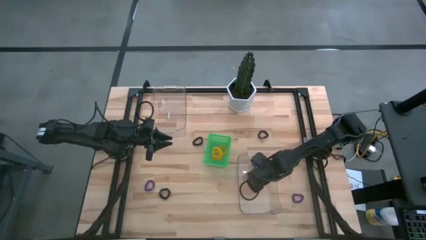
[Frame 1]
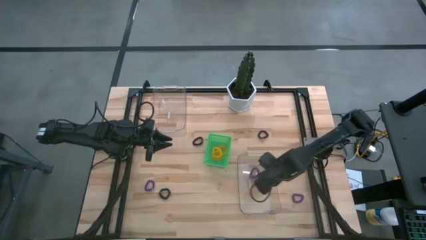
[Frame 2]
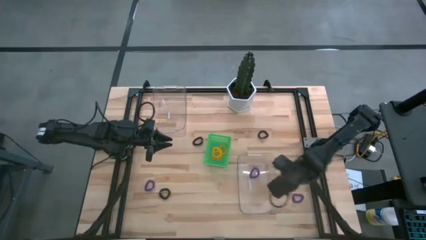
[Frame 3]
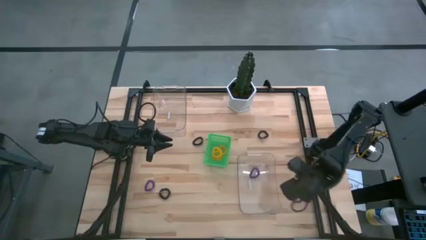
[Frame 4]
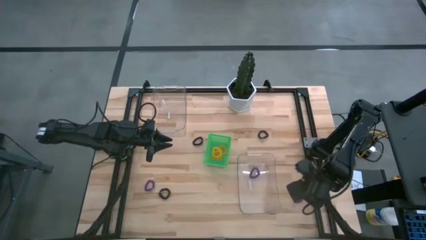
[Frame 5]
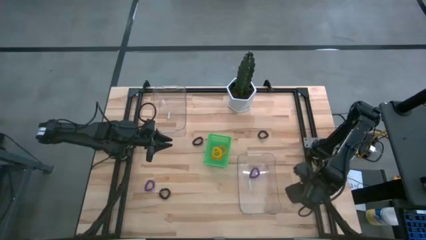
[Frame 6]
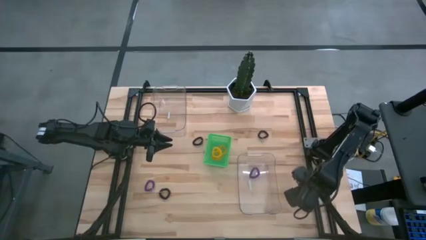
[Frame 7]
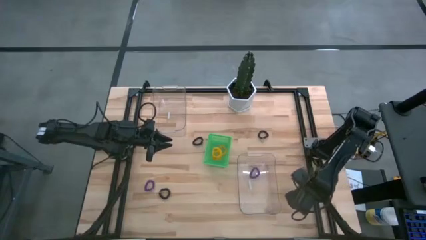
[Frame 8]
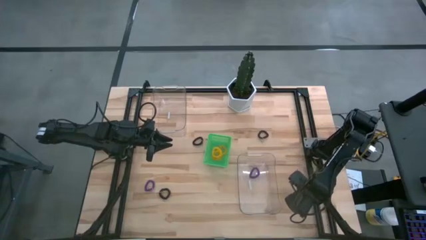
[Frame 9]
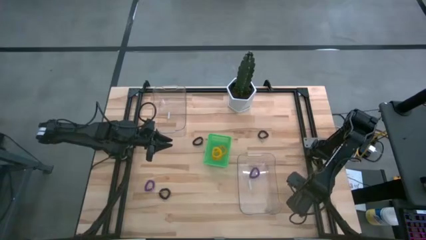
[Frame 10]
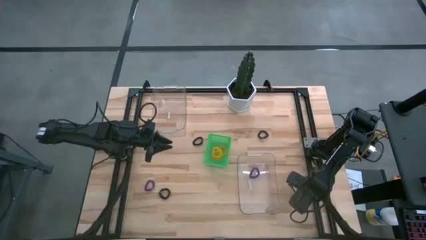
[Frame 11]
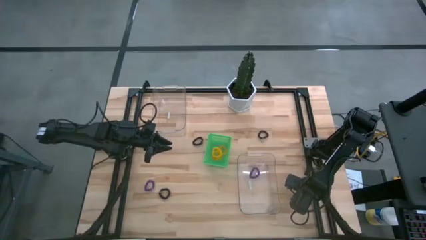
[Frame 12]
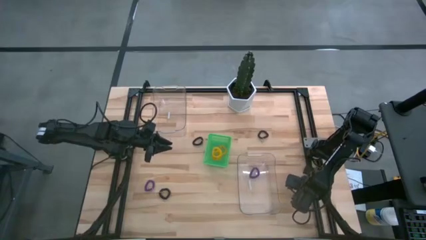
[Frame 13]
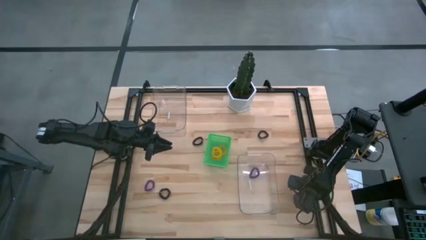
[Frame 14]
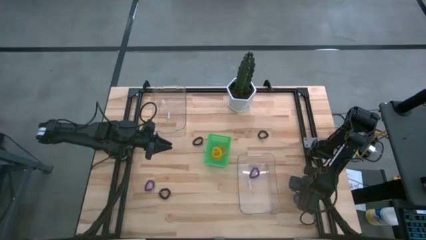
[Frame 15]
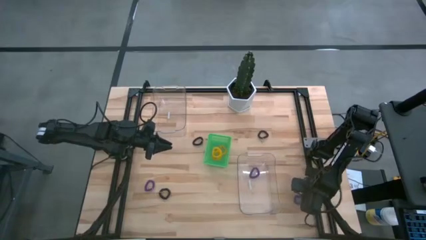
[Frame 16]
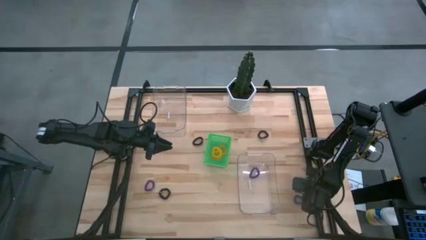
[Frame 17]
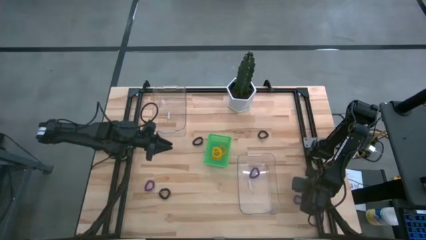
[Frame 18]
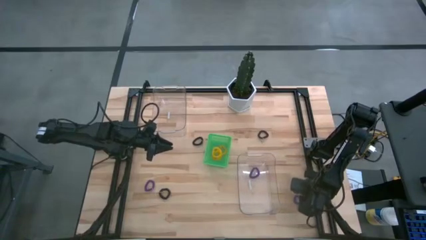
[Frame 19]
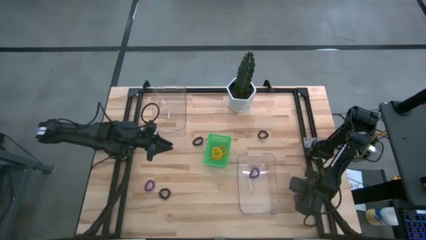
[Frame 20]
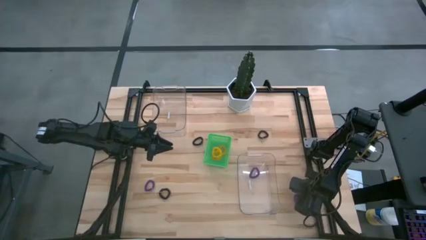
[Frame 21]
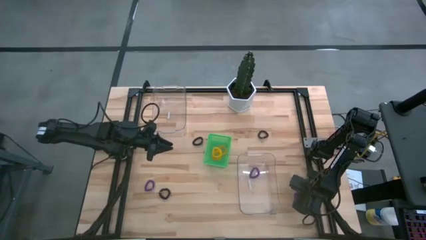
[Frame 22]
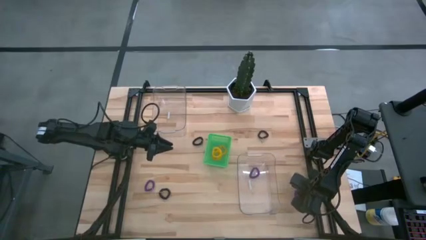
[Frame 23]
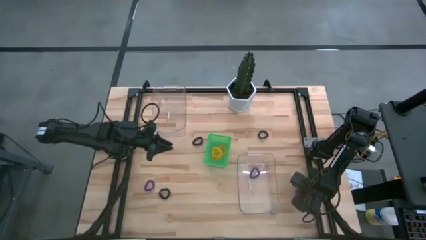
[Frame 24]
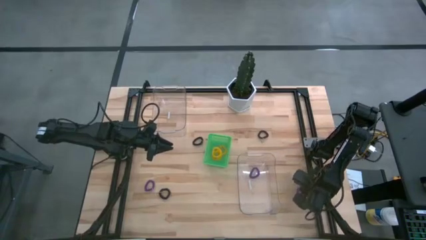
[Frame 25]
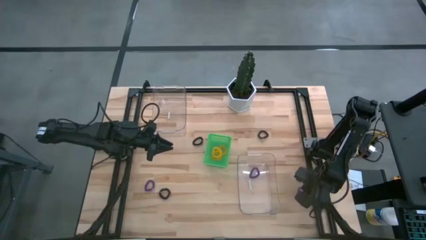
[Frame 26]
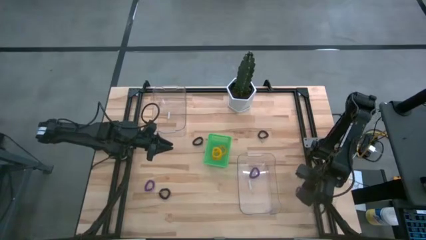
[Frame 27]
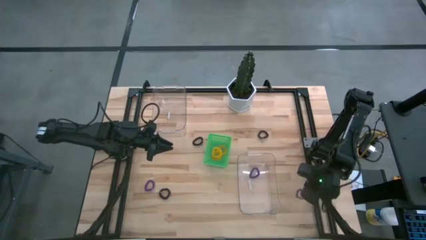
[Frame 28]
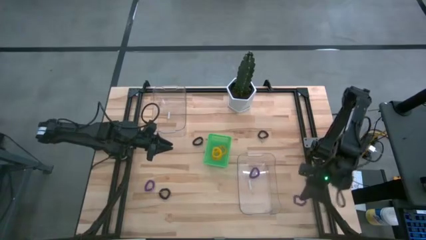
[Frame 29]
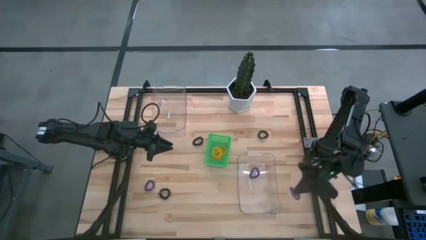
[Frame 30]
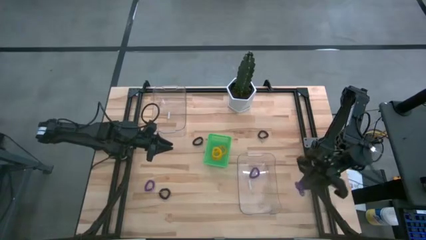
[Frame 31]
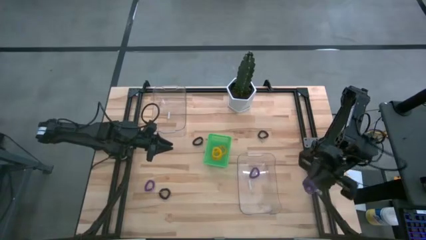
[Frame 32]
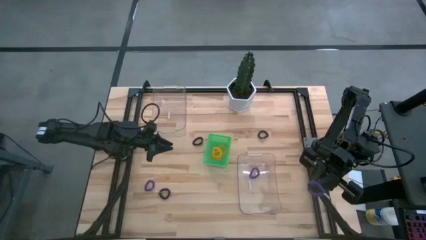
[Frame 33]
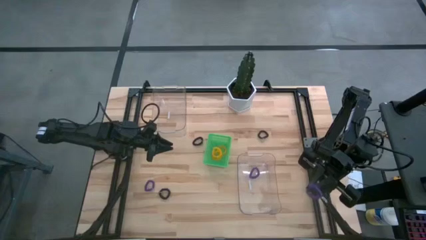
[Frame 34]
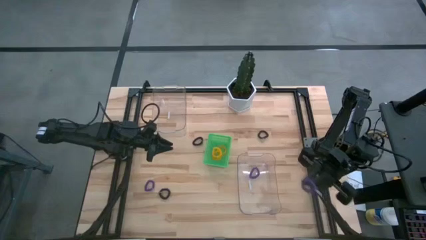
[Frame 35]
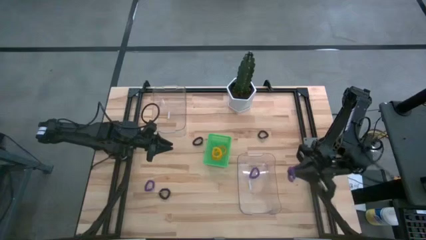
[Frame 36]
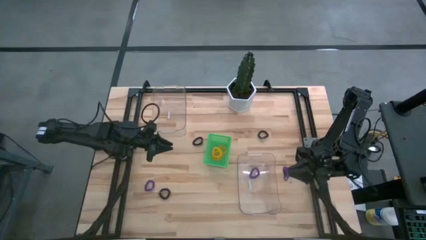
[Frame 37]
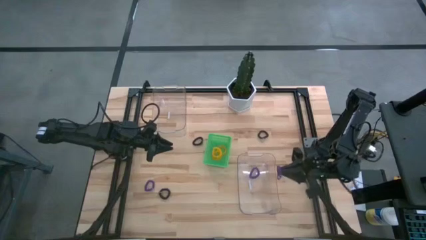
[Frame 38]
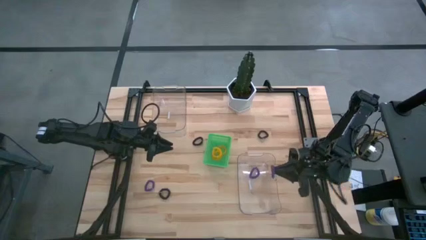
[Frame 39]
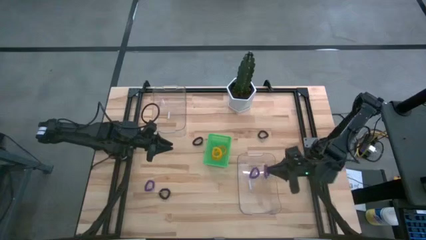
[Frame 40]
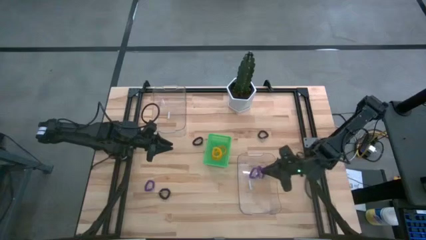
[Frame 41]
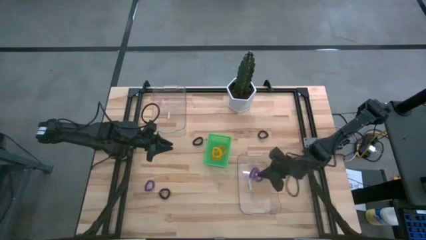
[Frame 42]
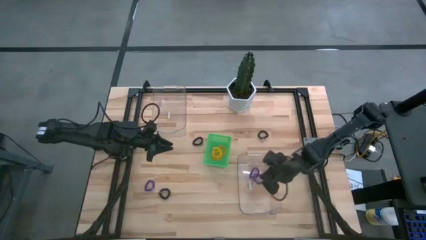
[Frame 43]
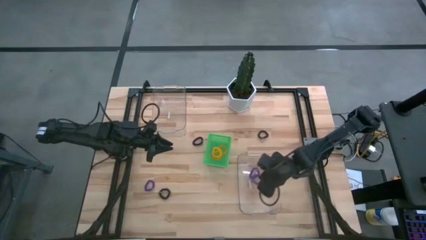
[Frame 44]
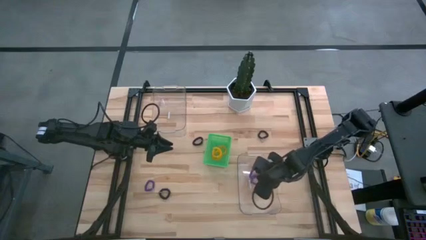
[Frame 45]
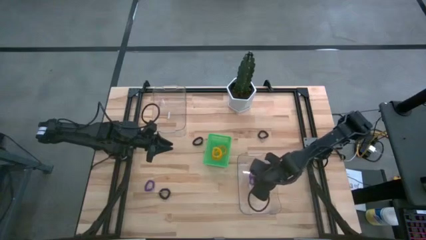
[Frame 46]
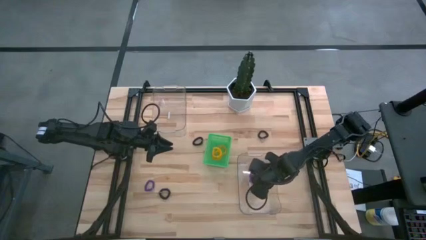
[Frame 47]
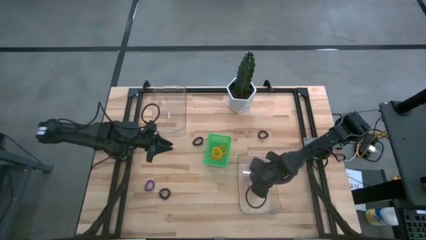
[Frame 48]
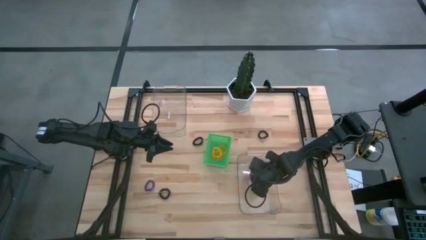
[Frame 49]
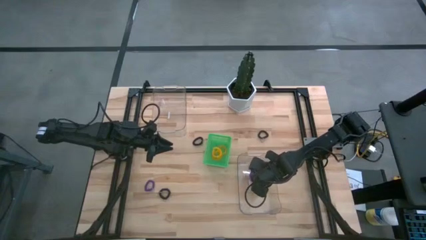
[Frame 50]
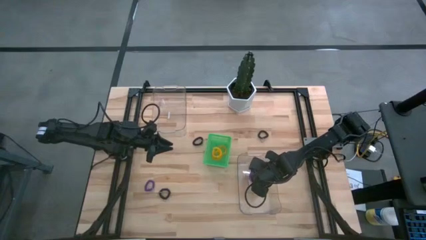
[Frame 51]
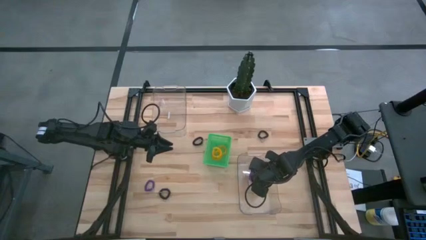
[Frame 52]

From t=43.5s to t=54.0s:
Task: Sort spring keychains
Put the right purple spring keychain into the right transparent bin

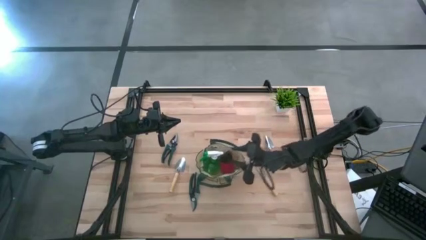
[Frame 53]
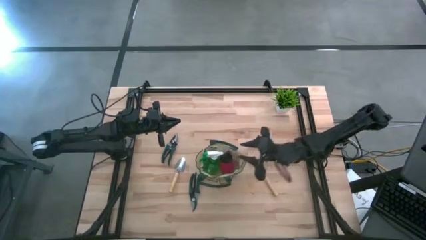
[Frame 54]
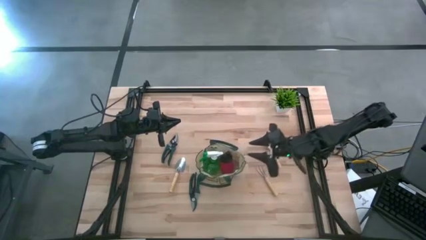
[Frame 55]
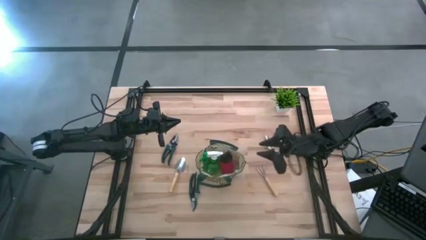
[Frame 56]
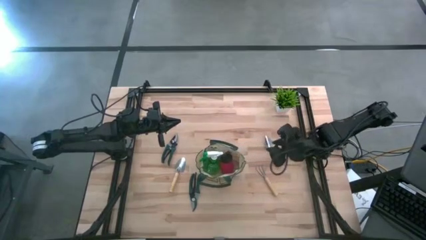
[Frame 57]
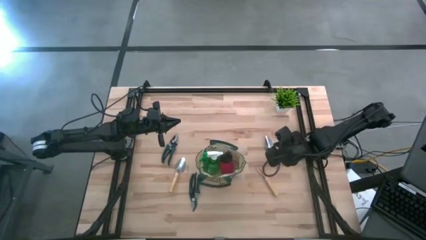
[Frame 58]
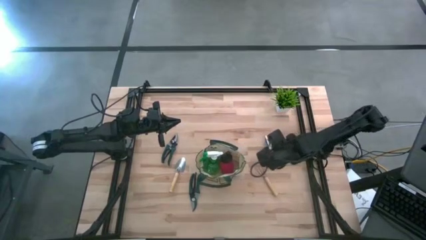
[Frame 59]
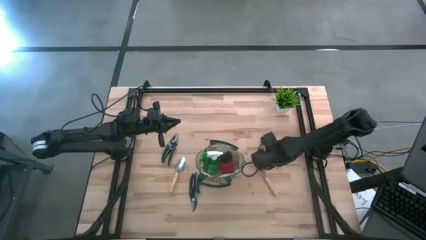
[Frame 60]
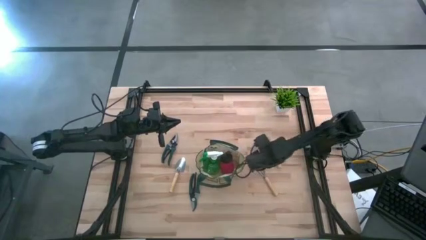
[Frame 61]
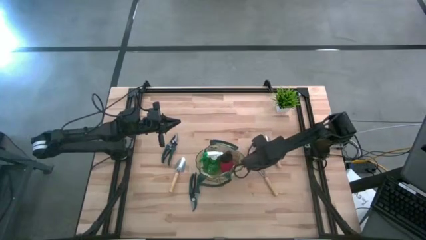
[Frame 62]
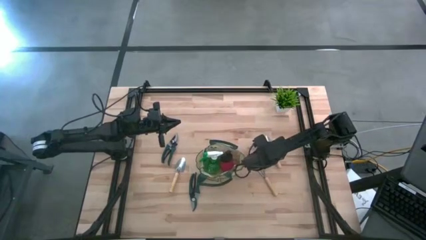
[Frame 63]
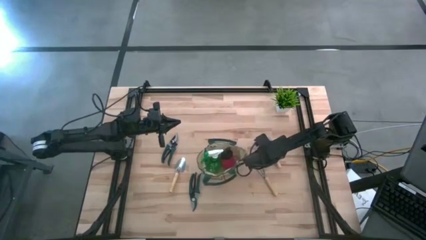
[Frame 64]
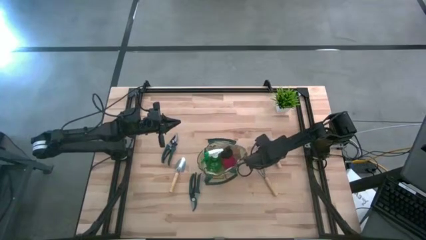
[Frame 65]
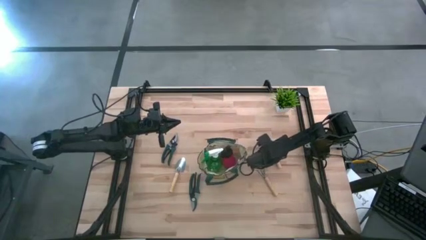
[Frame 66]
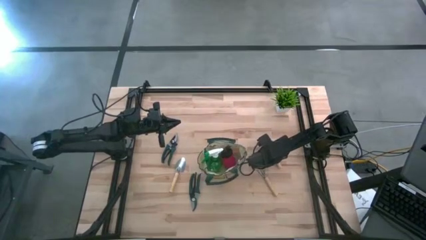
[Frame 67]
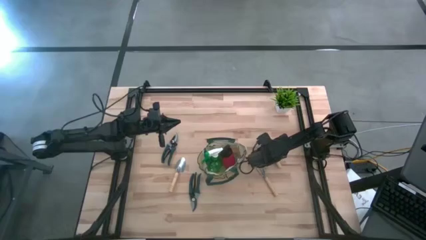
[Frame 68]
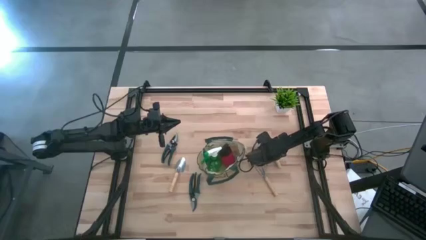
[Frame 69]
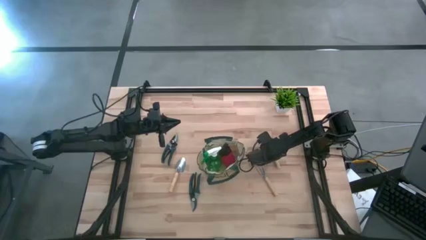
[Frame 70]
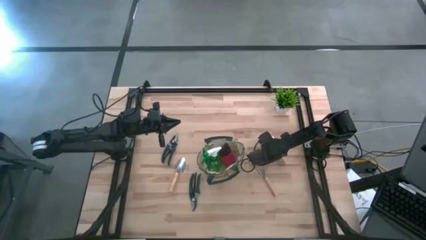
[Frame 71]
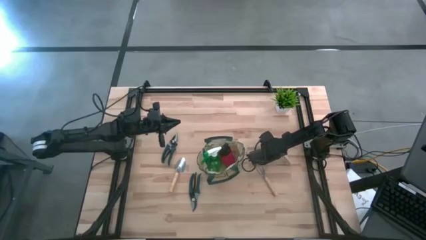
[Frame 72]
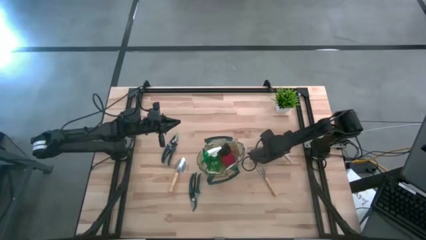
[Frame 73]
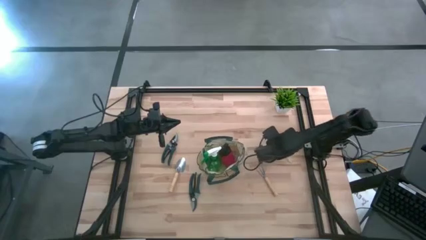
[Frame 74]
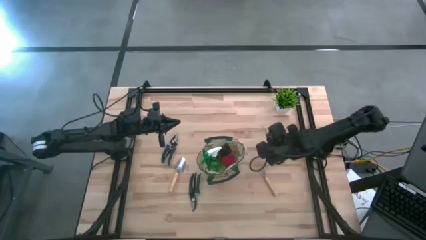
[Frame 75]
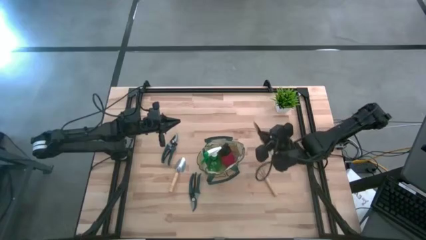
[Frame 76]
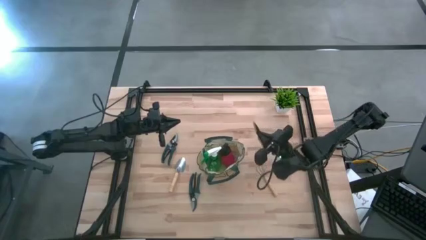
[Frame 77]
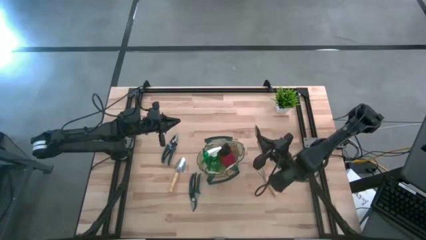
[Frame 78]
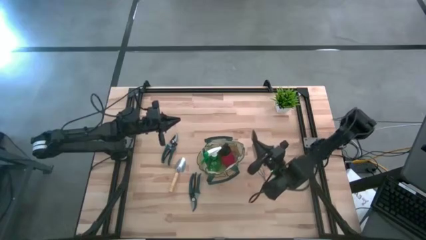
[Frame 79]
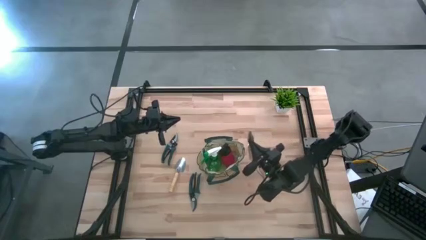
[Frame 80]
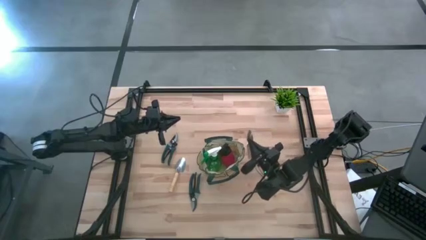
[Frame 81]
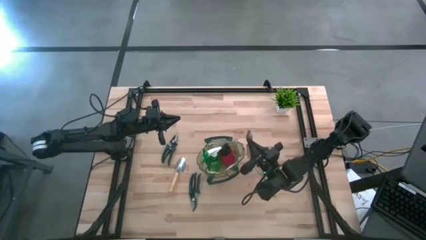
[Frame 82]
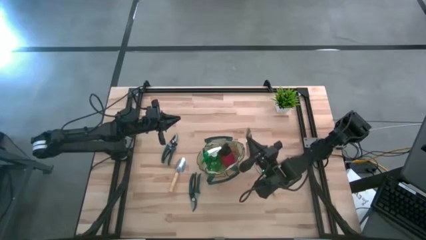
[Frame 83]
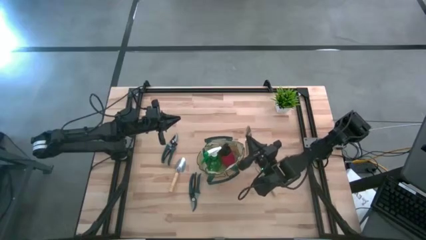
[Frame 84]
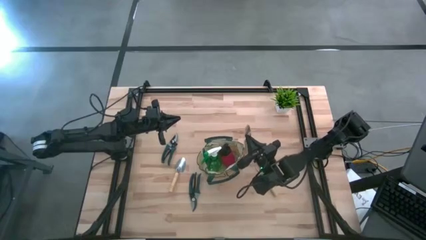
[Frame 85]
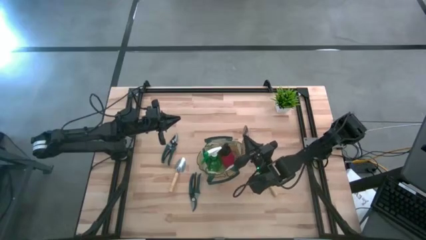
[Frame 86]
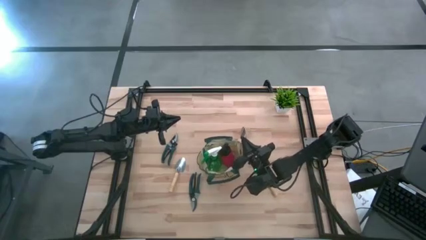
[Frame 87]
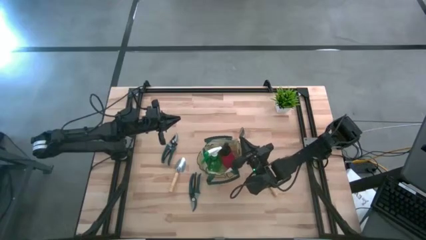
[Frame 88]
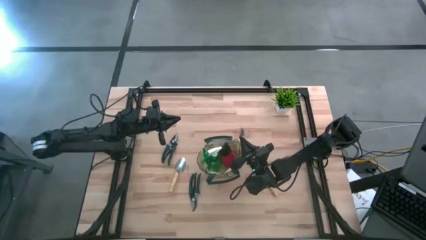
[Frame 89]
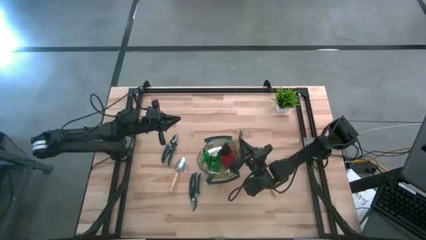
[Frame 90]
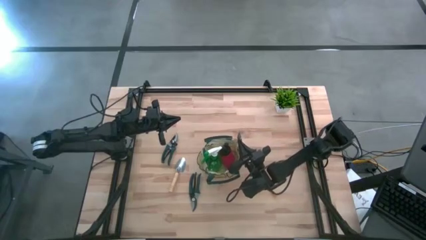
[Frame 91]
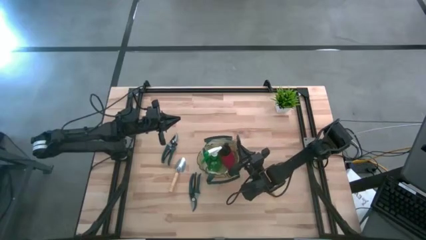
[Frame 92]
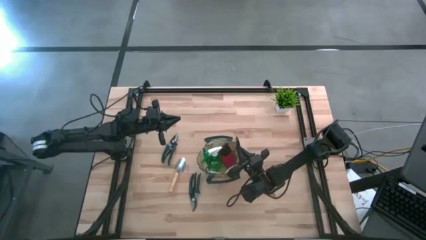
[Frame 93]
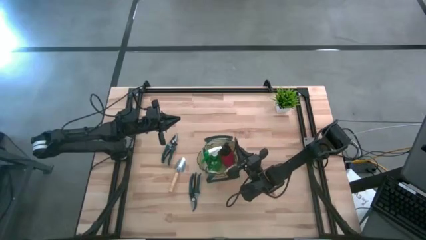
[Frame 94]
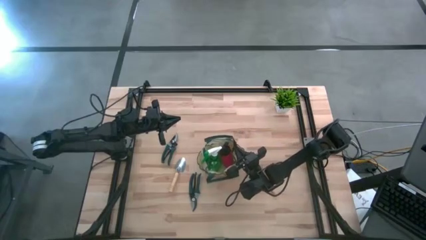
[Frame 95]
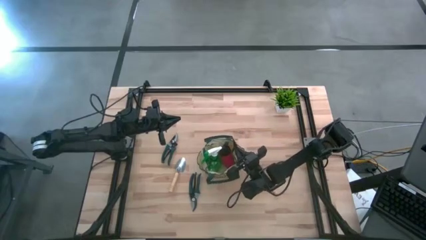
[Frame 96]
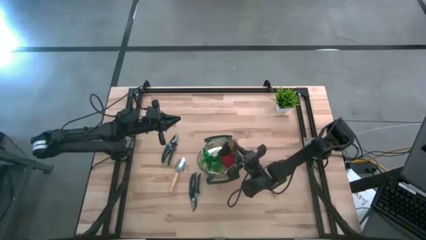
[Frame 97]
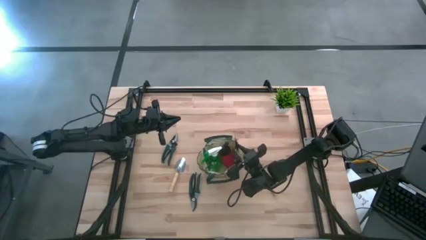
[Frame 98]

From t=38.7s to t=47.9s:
Task: Pick & Place Garden tools in Gardening bag
Put the right brown trowel into the white gardening bag
